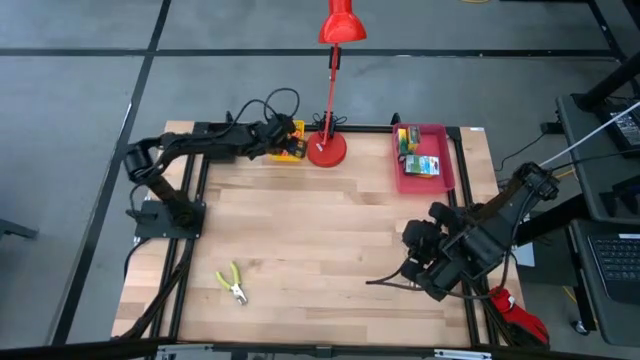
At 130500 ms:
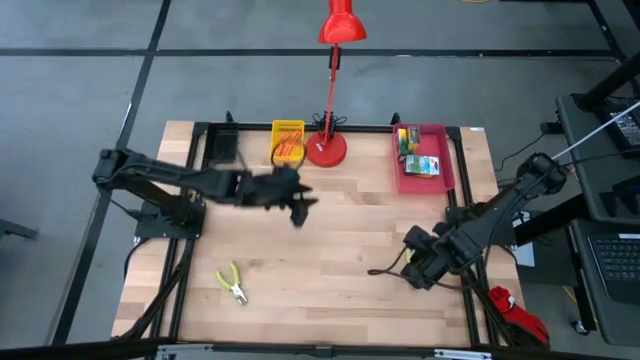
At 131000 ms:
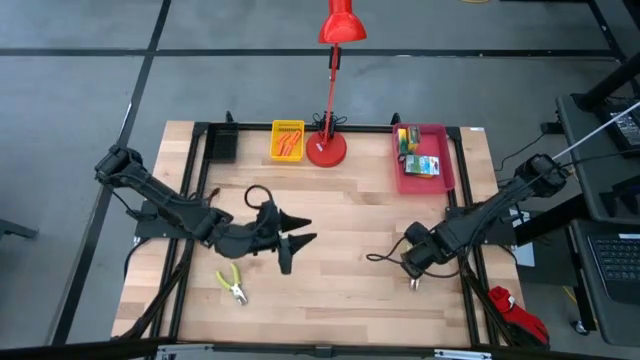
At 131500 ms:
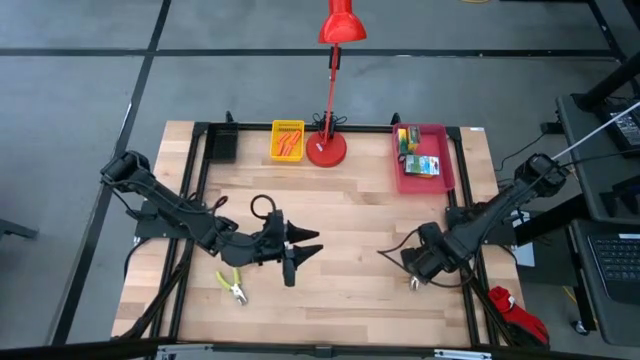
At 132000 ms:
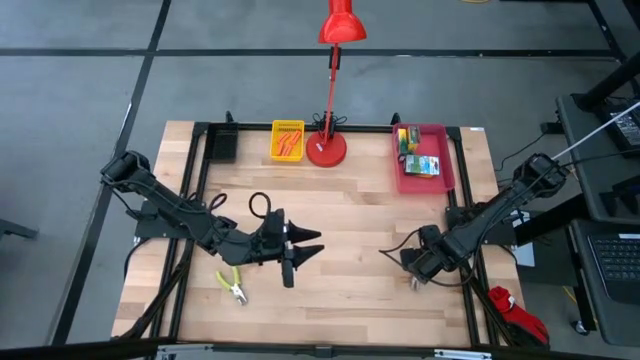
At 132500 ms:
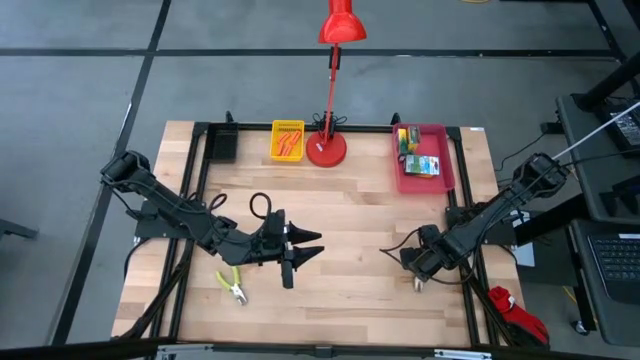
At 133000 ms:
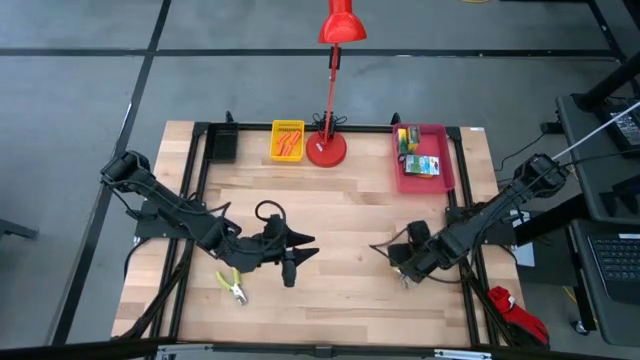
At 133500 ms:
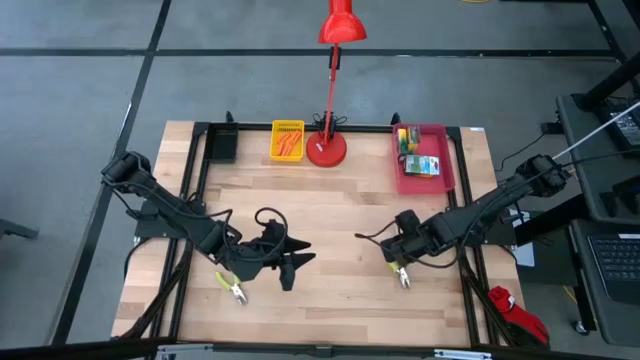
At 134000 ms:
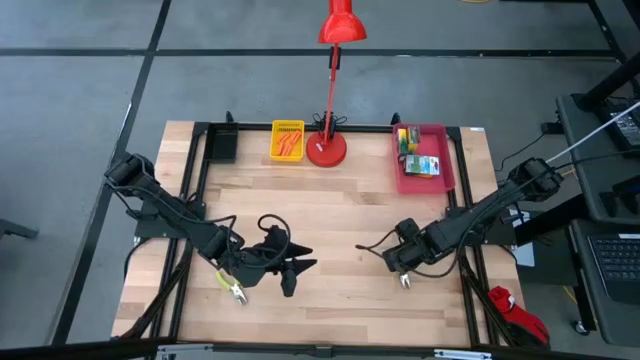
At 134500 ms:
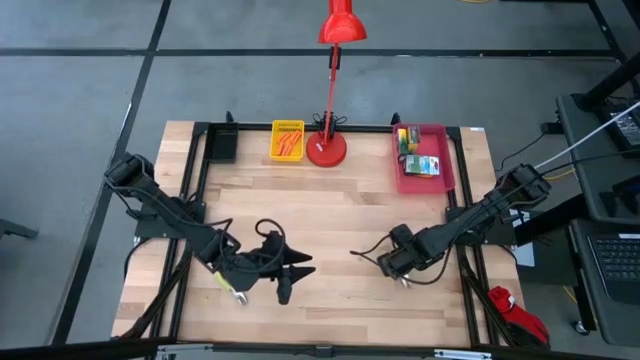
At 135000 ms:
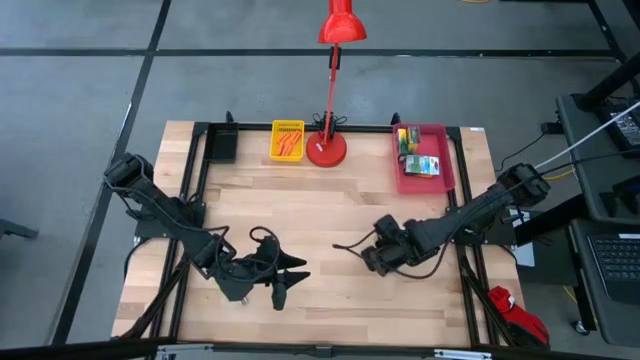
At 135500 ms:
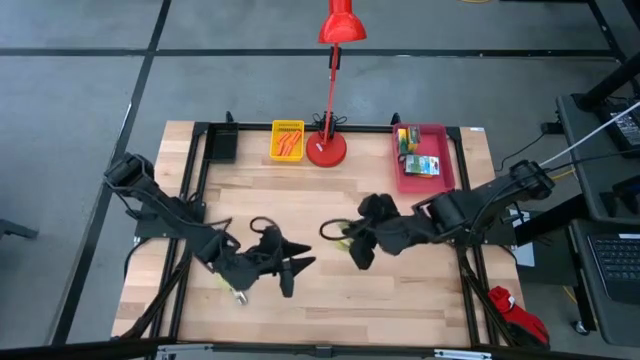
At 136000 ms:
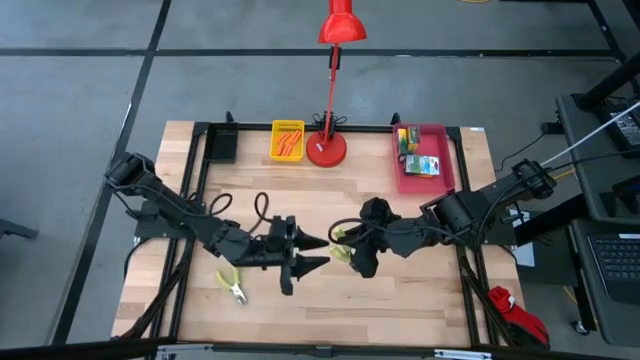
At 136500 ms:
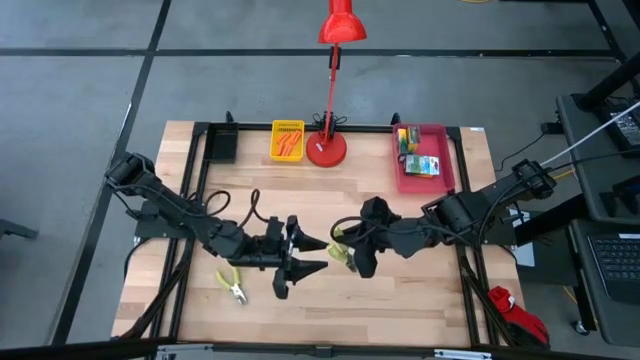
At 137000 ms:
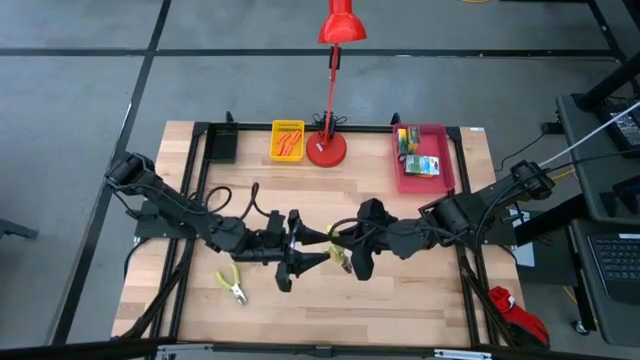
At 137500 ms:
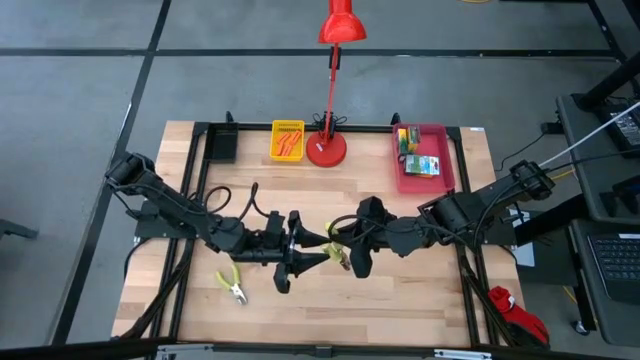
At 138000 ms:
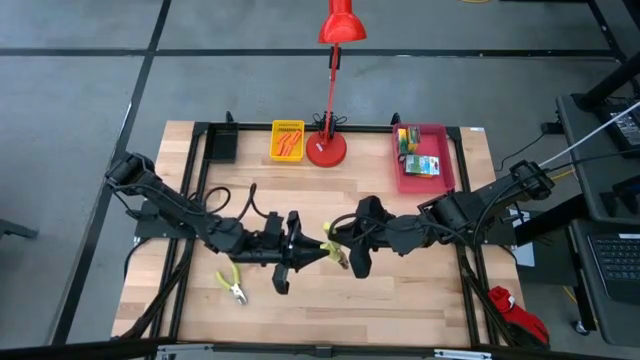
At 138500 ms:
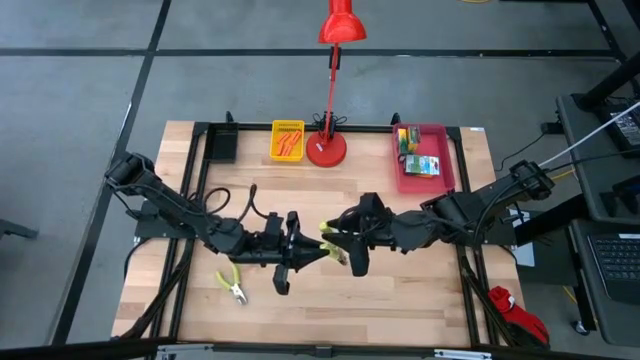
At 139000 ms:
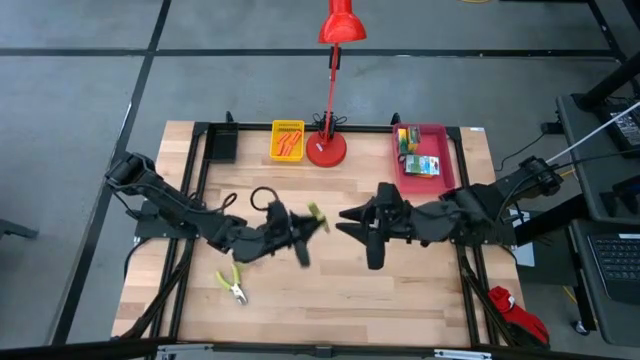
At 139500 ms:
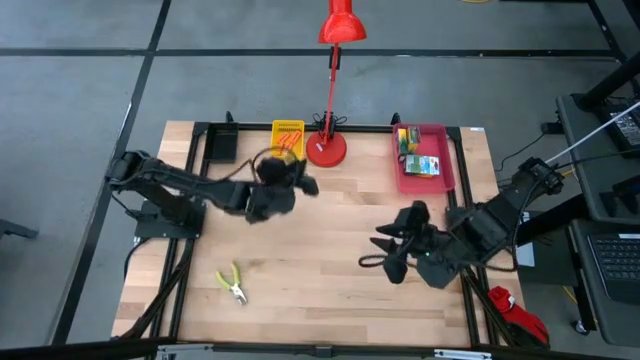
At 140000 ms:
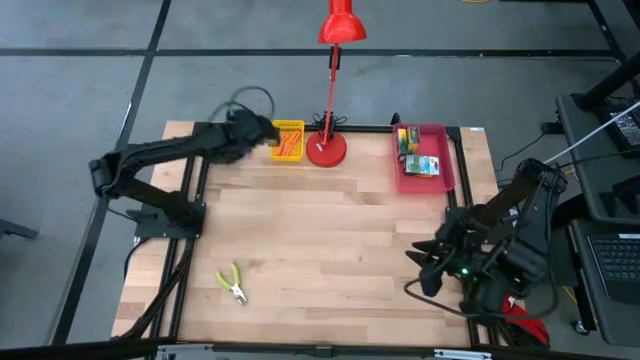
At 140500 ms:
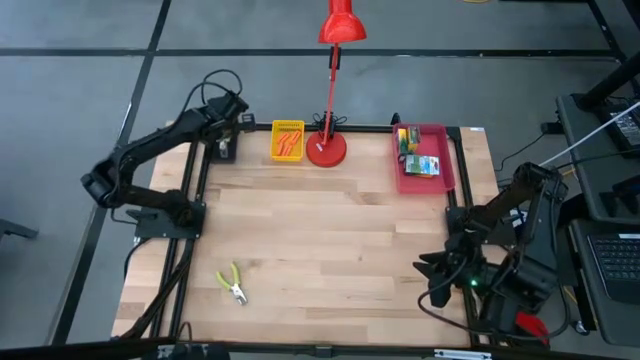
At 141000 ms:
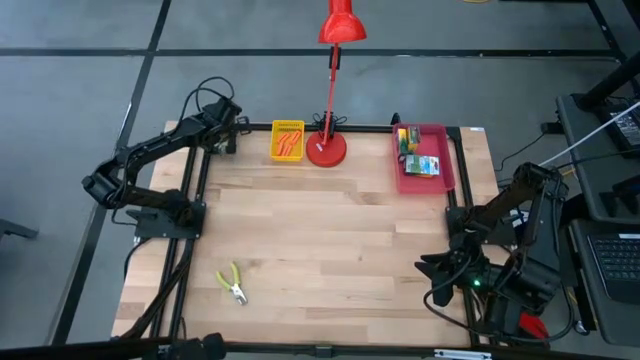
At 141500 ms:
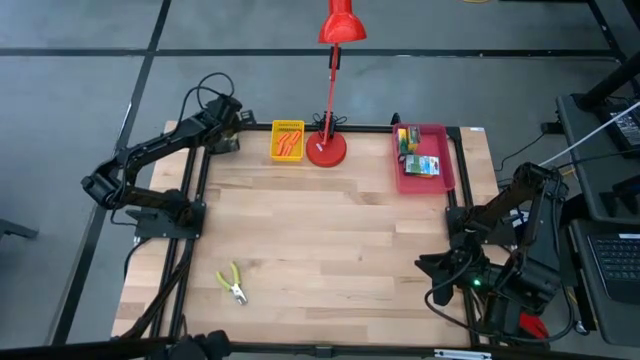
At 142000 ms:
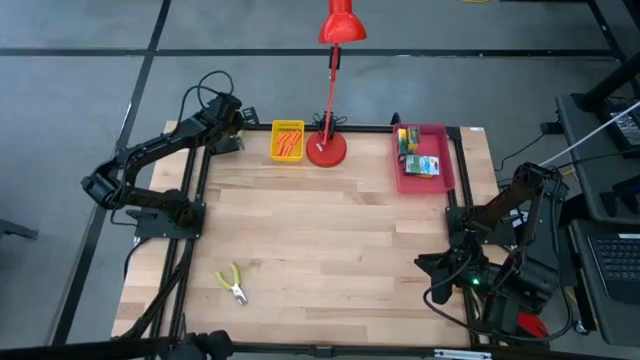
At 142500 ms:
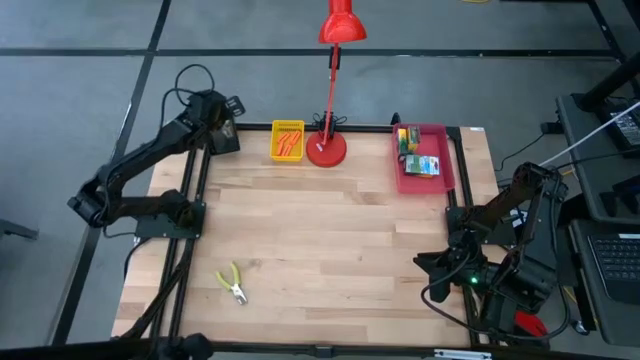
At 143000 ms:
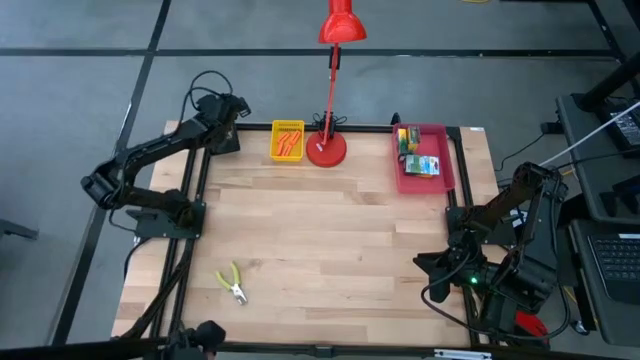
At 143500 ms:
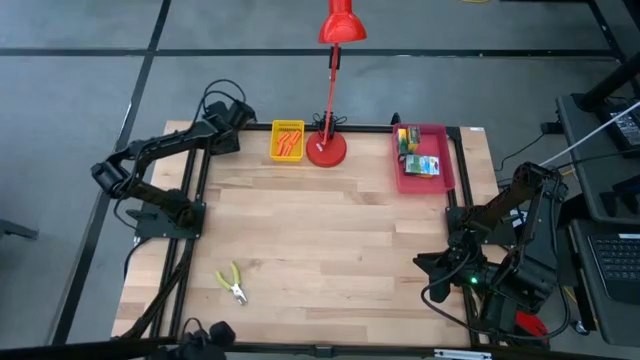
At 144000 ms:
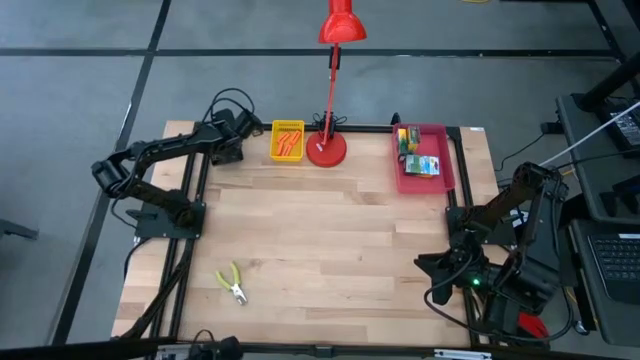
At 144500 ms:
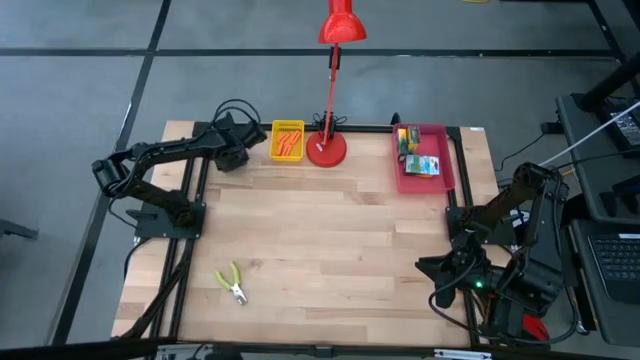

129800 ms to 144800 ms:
Task: Pick & Place School Supplies
Put the green hole puncher into the black bin

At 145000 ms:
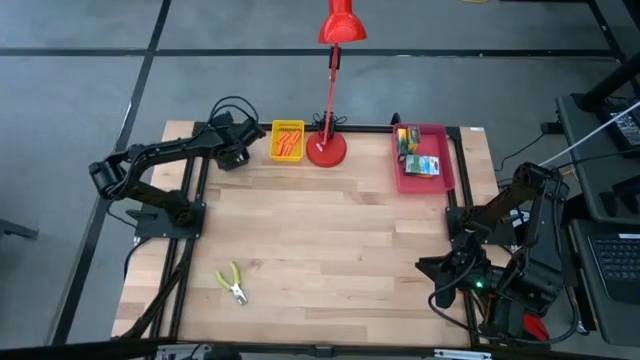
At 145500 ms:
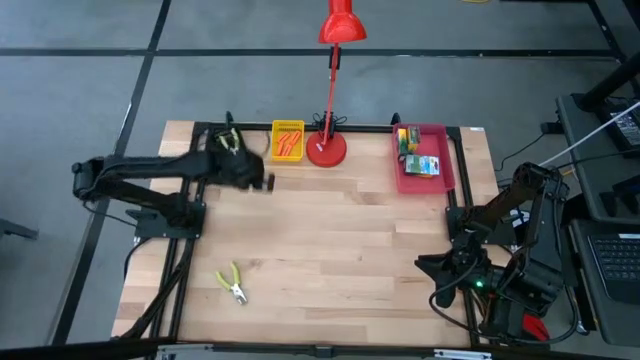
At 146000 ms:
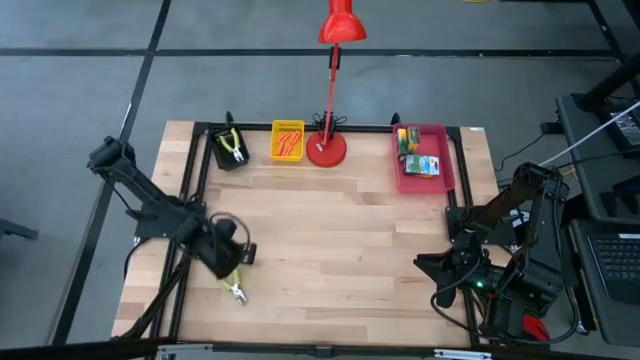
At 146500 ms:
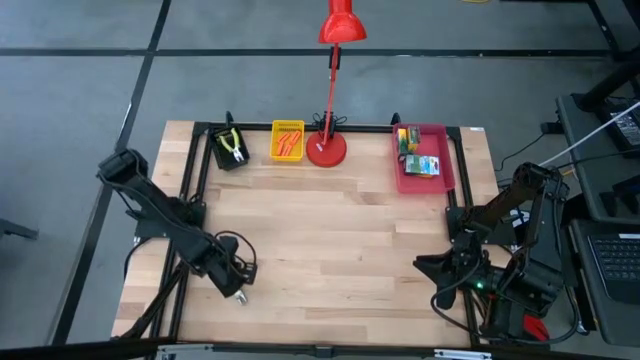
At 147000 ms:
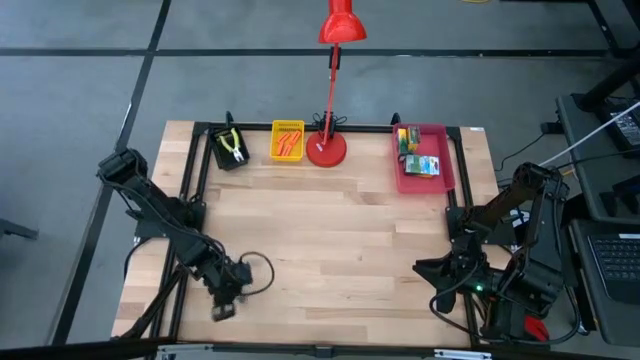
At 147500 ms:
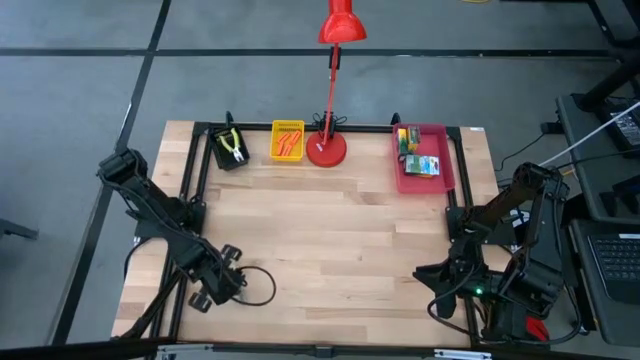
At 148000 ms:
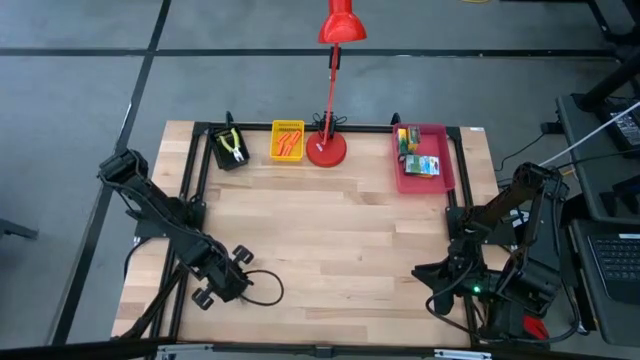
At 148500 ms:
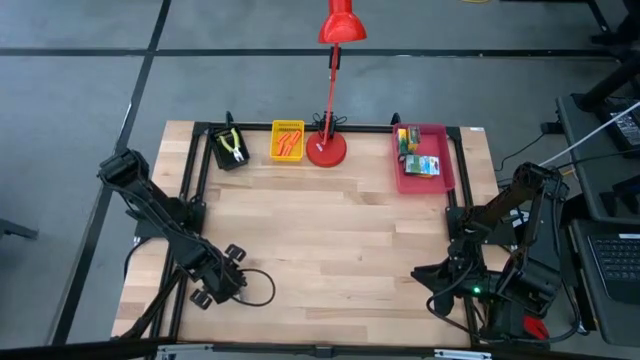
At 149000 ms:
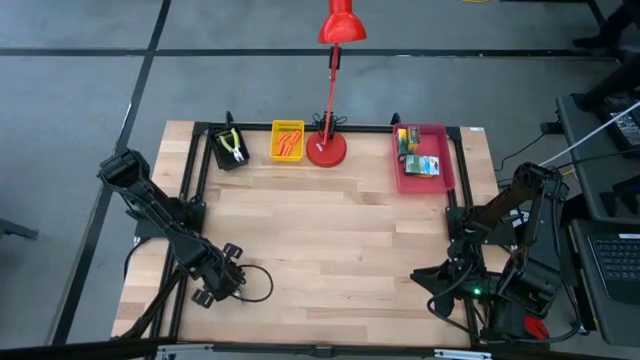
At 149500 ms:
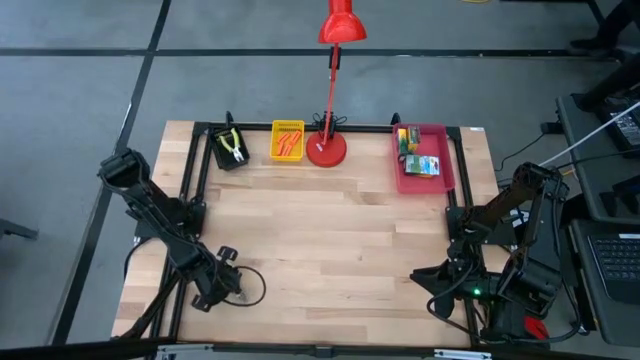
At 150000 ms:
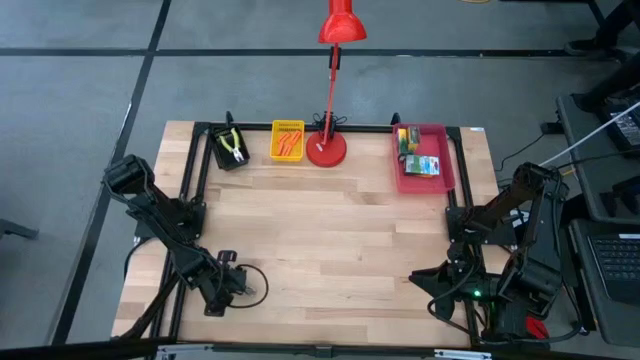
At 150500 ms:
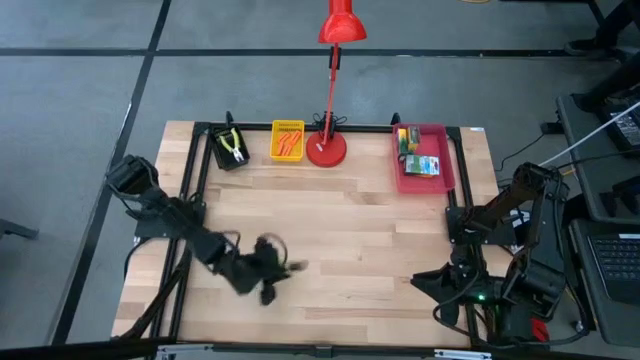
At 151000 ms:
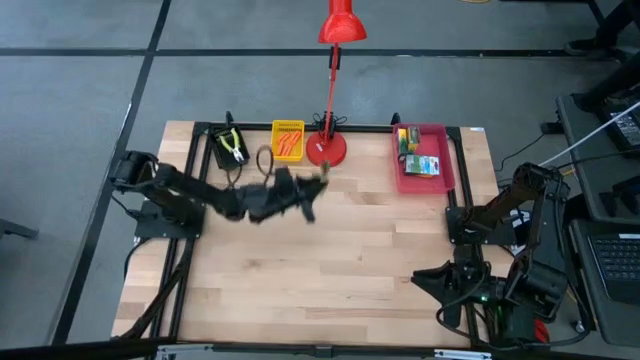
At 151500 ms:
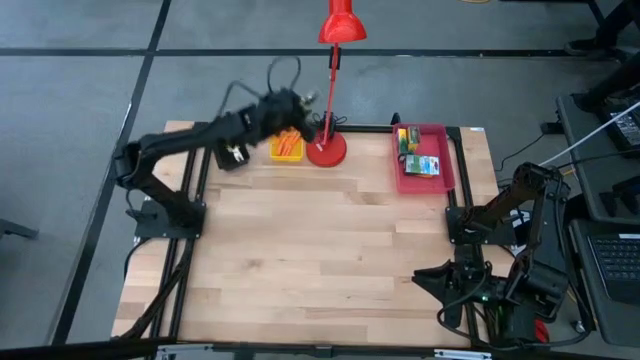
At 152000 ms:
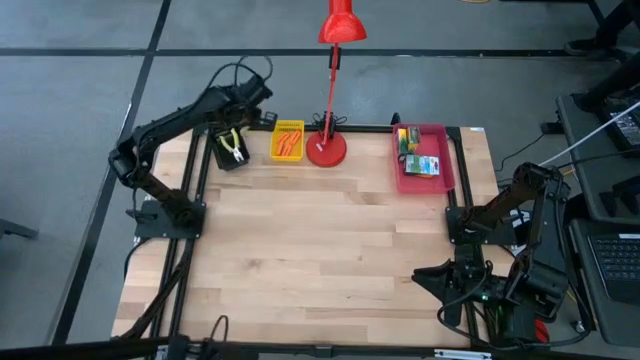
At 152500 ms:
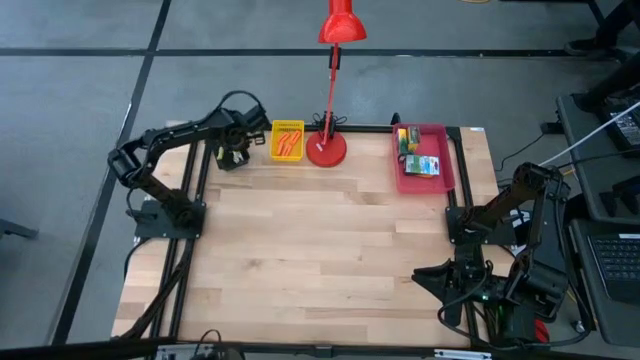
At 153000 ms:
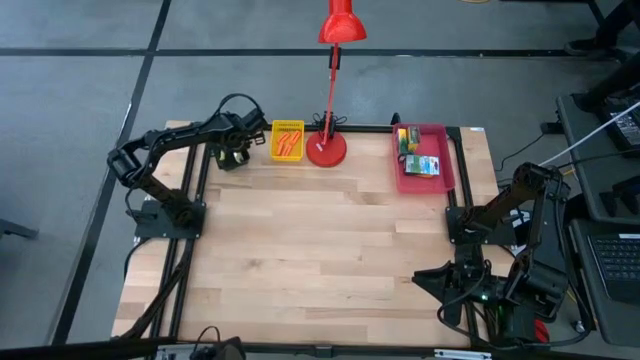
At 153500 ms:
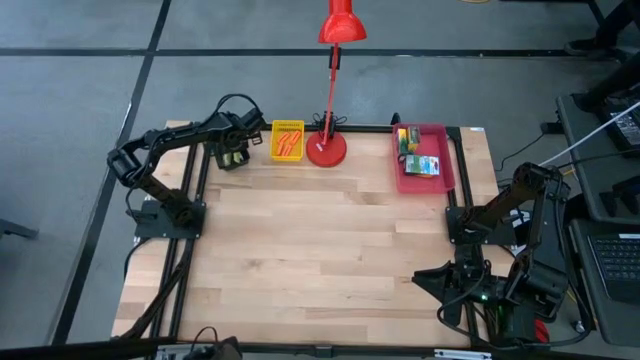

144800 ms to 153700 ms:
Put the green hole puncher into the black bin
